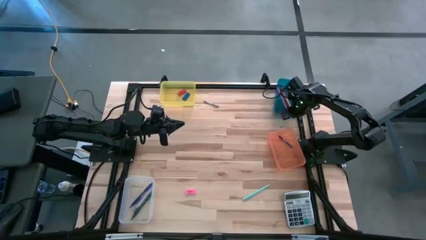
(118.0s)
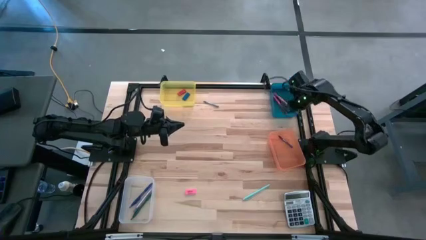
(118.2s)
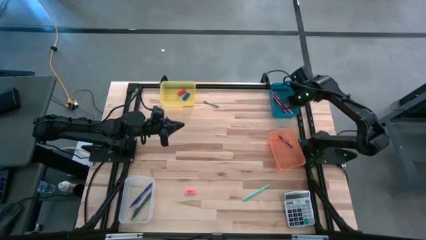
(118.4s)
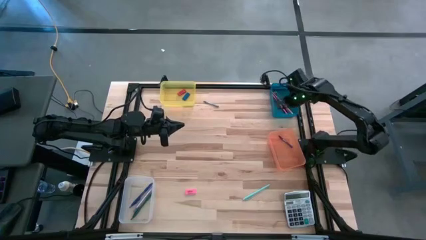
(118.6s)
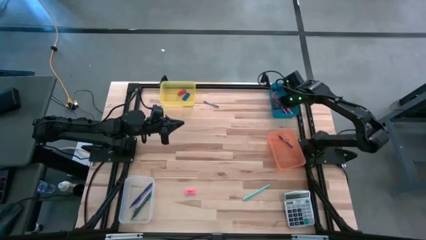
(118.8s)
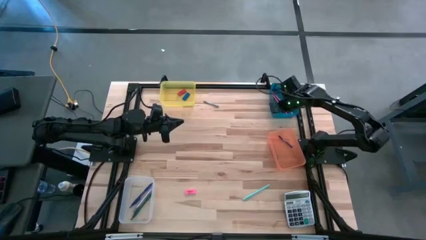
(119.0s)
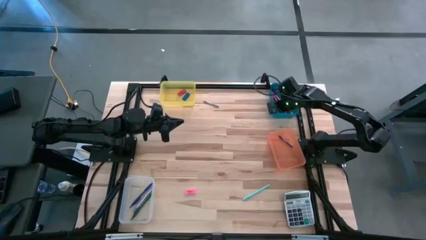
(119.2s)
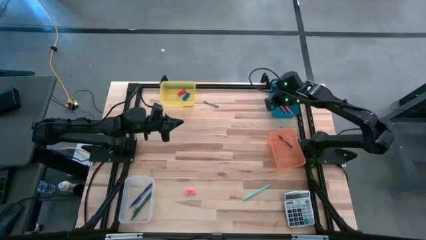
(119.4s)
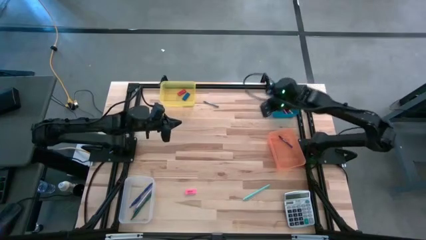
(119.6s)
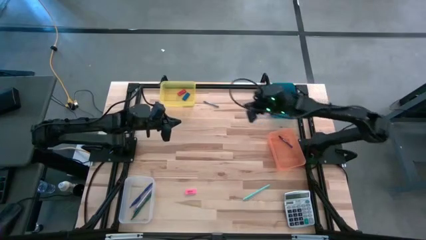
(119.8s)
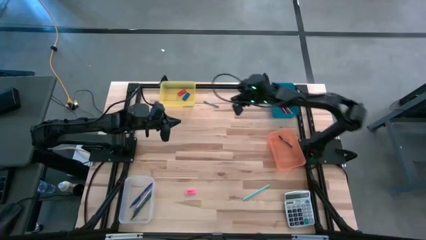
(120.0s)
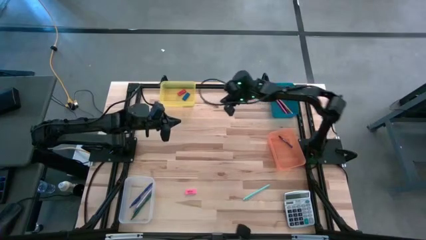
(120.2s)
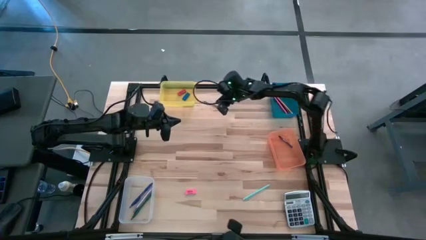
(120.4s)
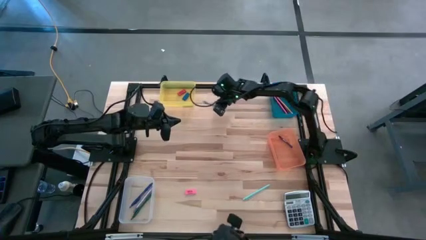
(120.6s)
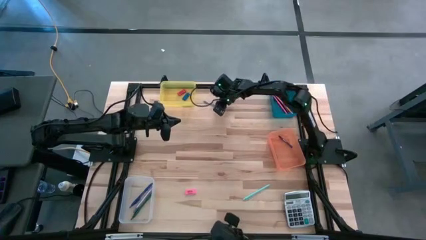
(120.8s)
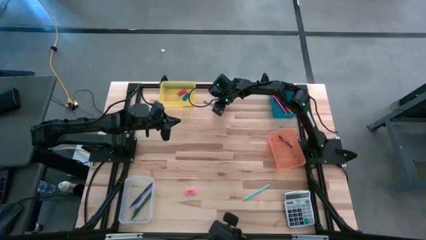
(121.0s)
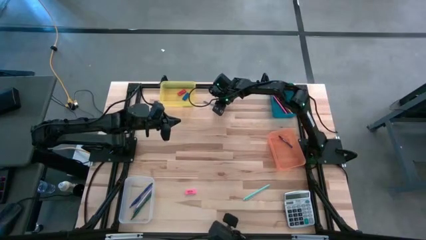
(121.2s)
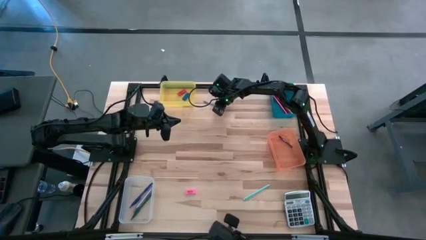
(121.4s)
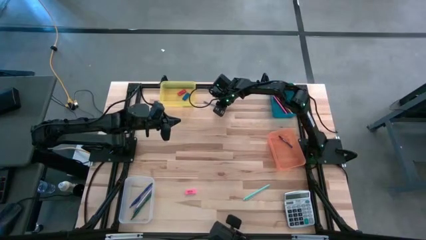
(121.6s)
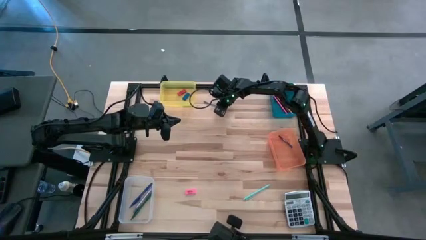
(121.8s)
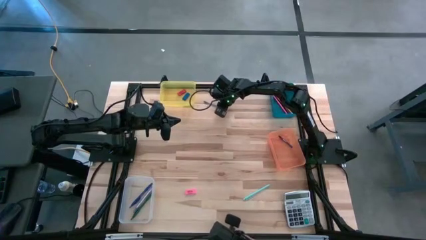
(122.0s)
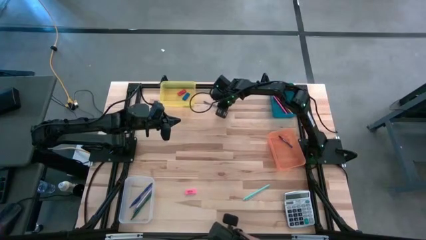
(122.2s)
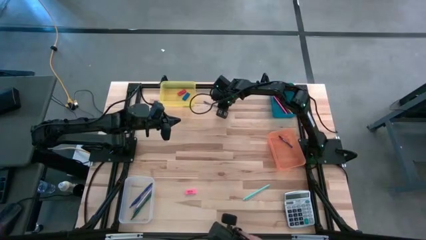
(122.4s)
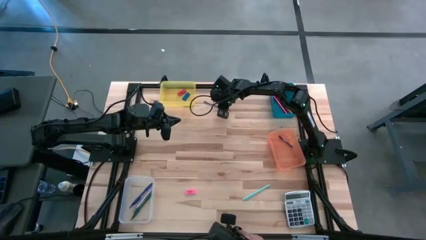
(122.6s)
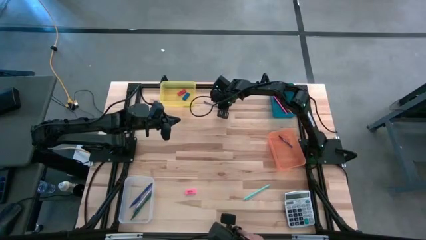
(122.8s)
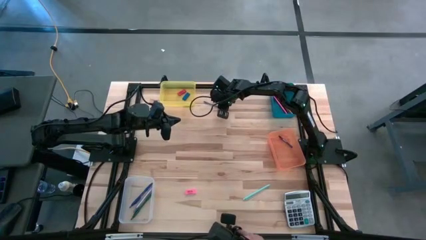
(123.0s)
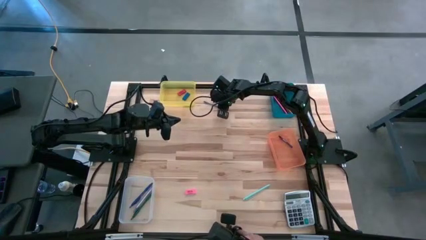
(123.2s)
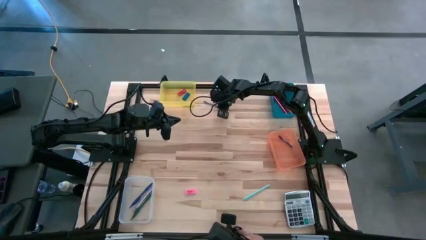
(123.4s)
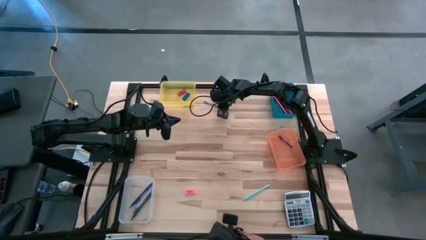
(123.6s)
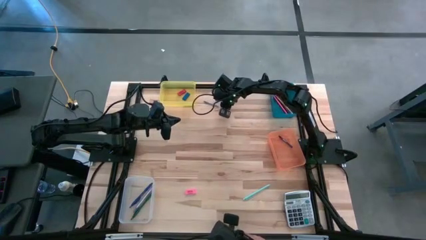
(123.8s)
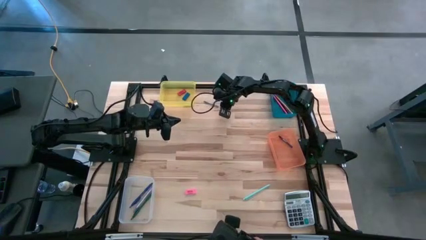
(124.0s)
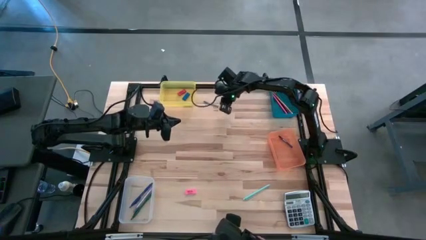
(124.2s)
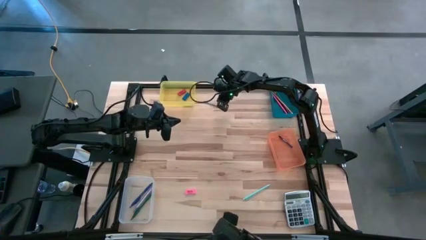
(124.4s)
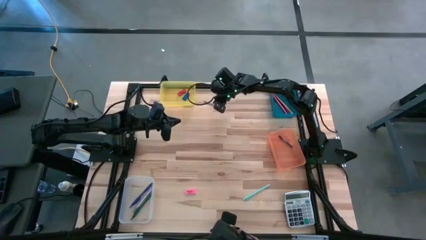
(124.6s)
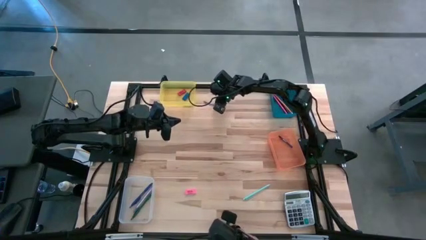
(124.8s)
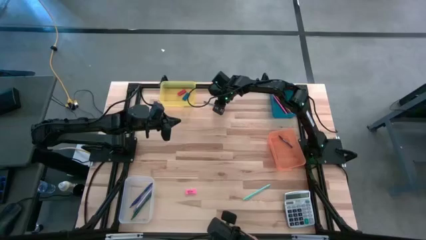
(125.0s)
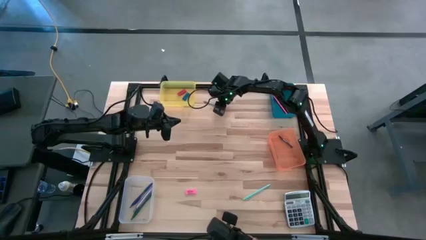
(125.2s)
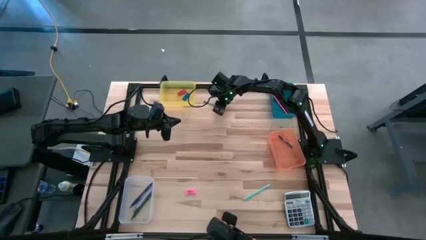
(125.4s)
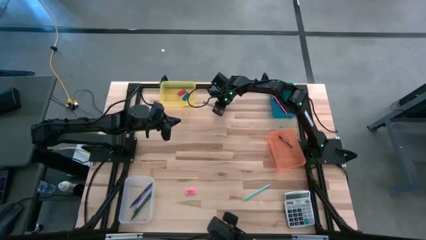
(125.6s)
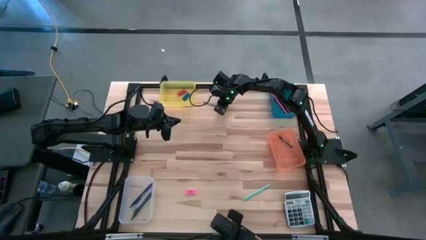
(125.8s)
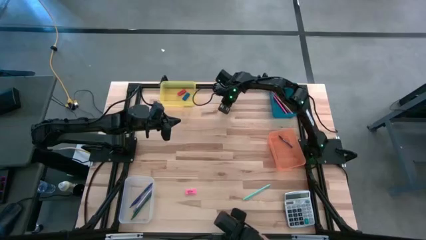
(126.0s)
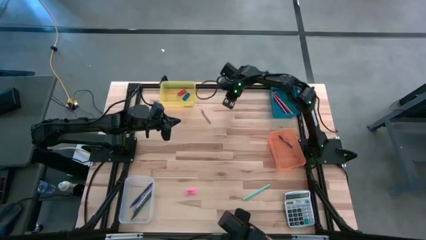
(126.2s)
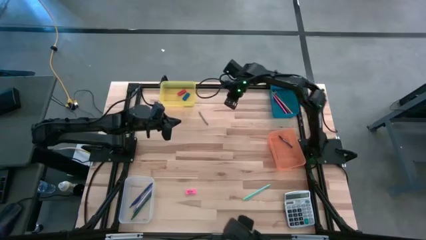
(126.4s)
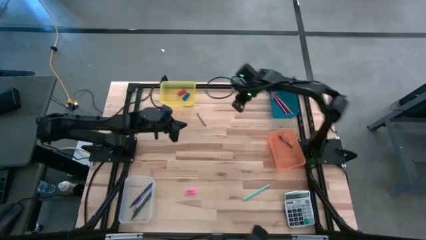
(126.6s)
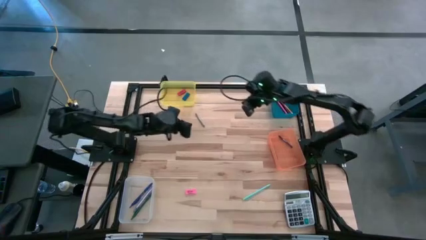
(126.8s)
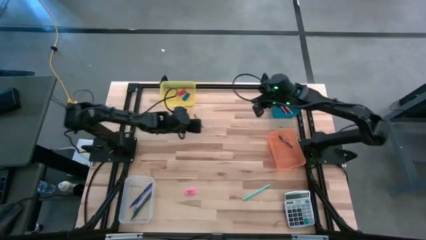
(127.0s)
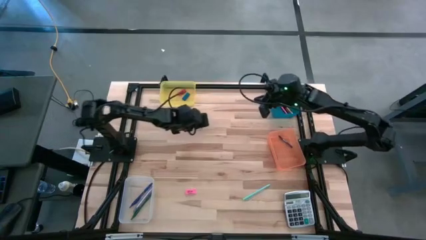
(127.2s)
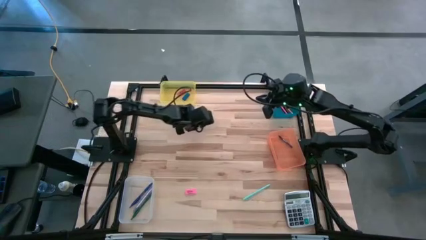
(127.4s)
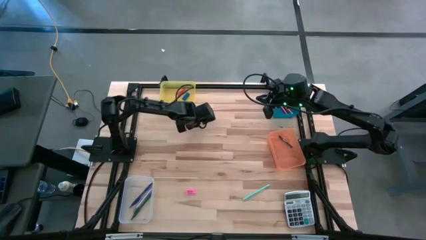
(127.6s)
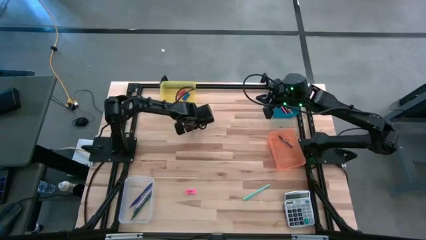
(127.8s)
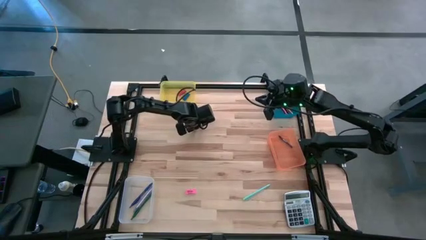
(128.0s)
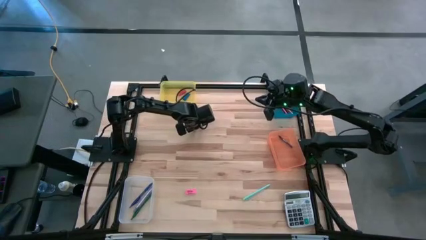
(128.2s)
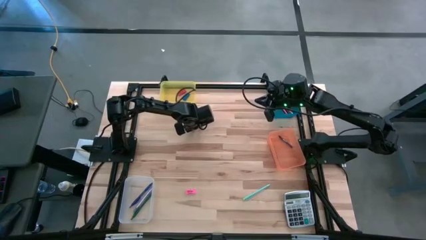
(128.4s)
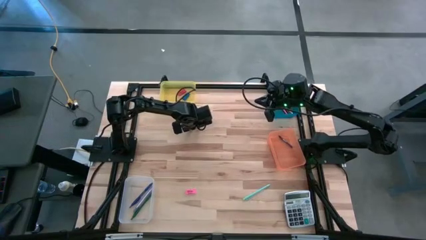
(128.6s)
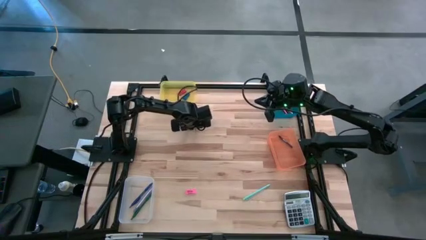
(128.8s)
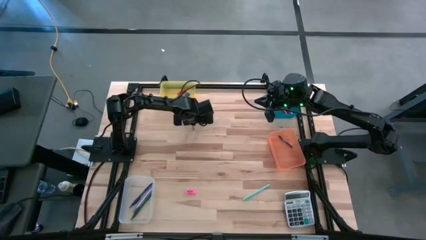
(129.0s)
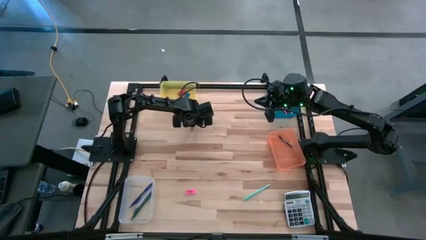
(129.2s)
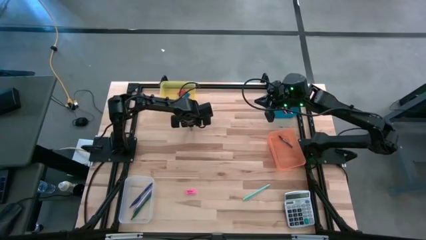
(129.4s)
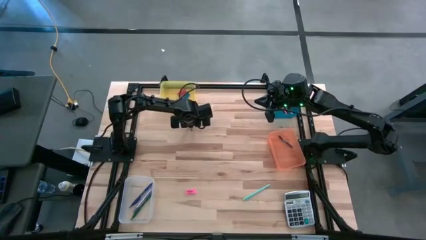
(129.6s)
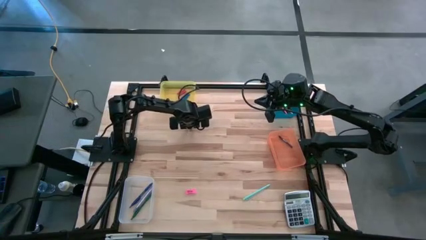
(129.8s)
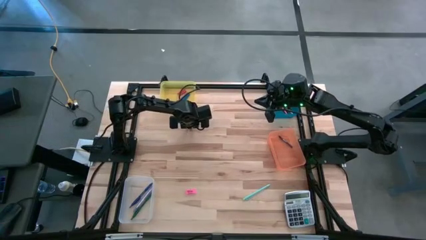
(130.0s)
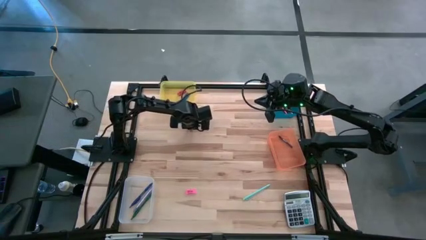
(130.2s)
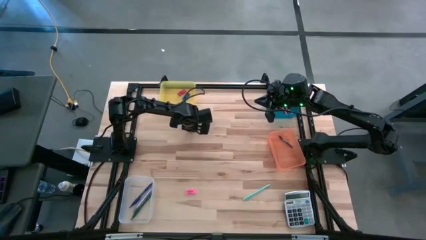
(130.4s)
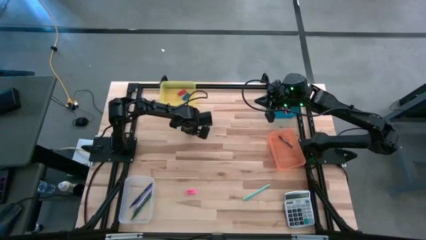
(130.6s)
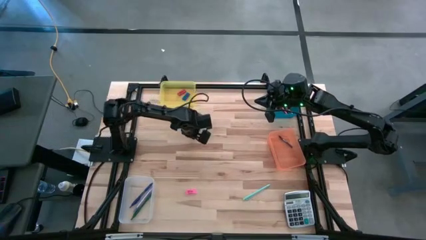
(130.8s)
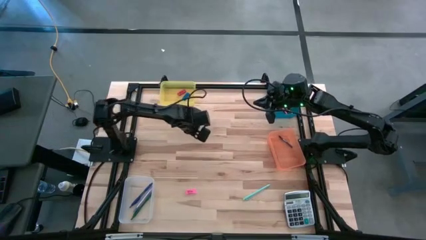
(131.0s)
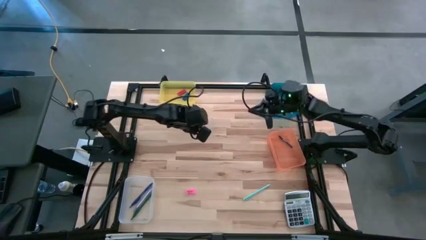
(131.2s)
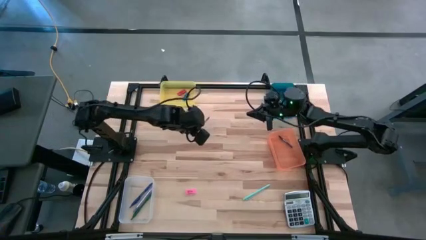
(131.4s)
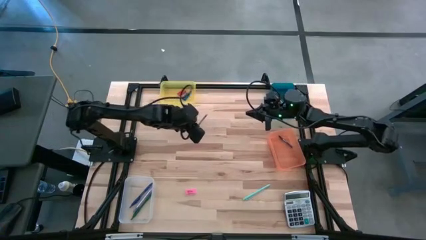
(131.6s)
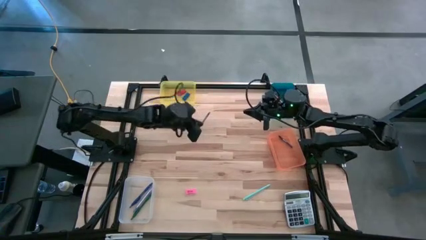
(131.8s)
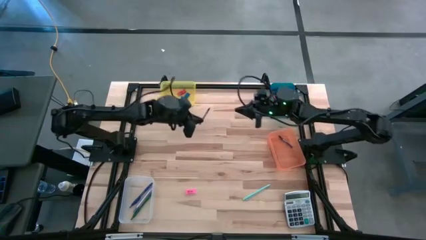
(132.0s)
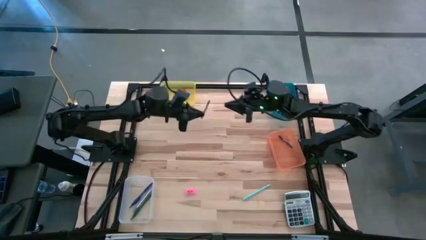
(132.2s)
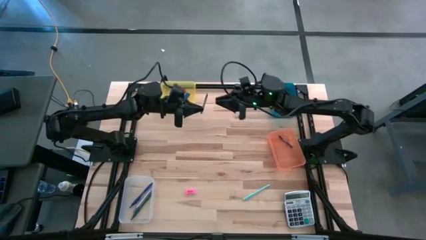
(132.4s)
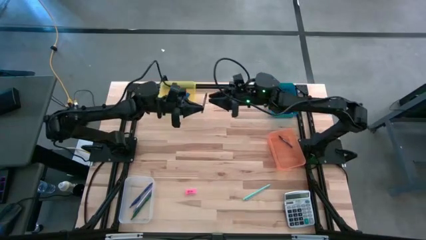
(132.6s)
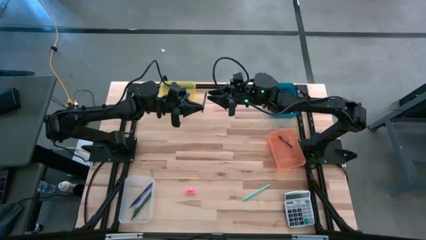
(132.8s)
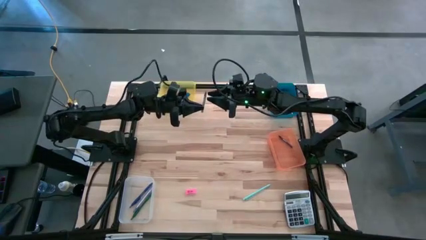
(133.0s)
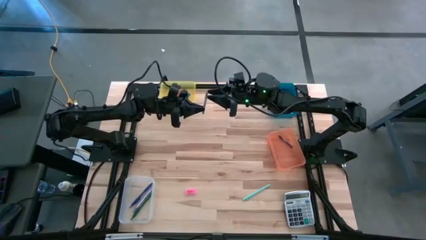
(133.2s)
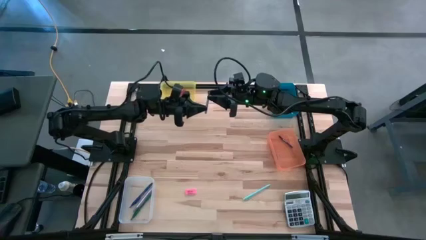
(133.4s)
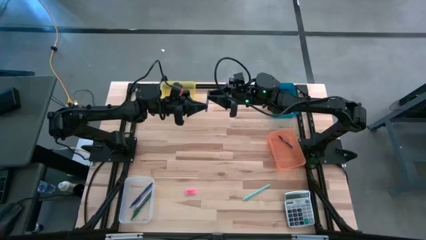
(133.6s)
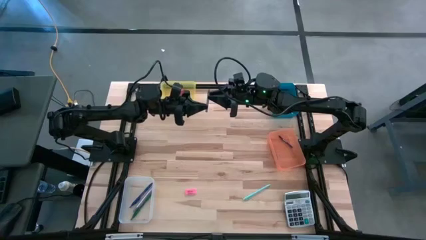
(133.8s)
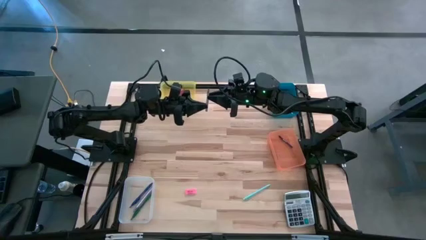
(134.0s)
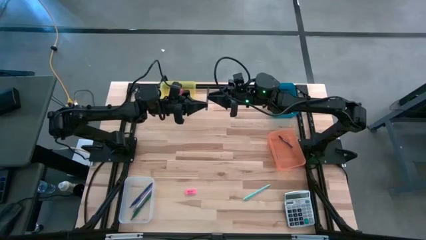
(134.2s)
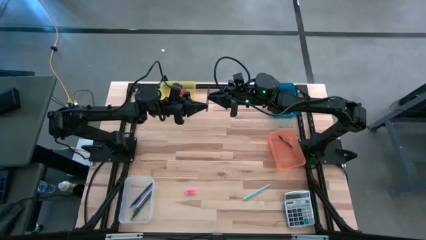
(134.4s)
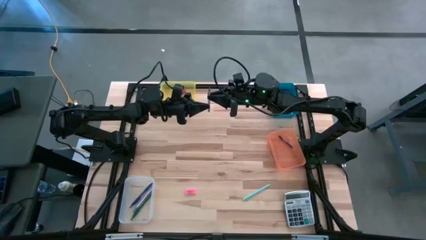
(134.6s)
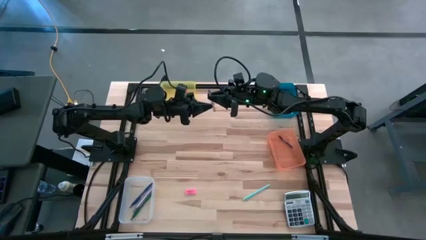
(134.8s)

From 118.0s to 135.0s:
Task: Sort crayons/erasers/pens/pencils in bins
Put the gray crayon into the orange bin

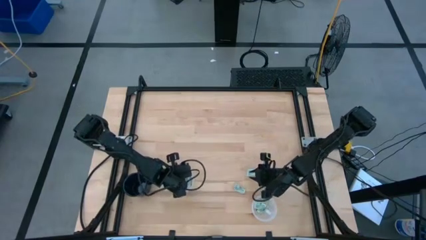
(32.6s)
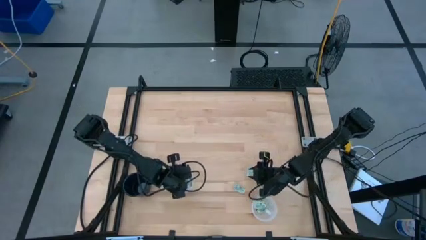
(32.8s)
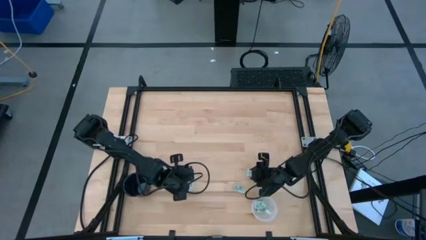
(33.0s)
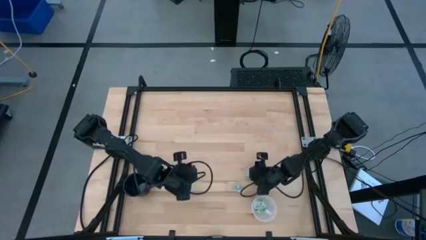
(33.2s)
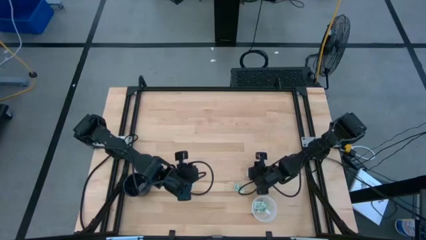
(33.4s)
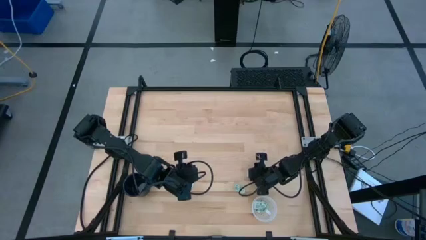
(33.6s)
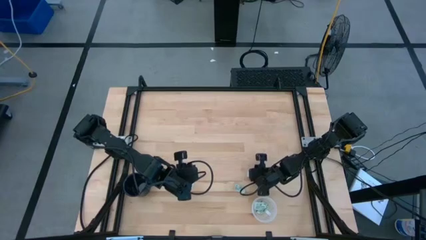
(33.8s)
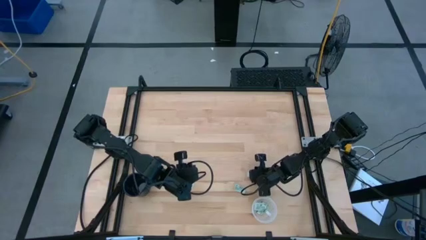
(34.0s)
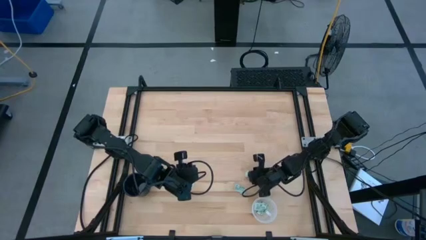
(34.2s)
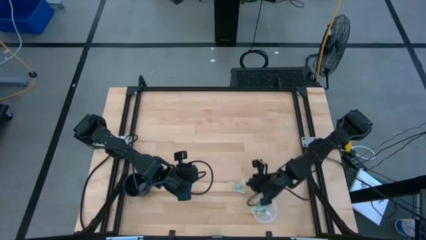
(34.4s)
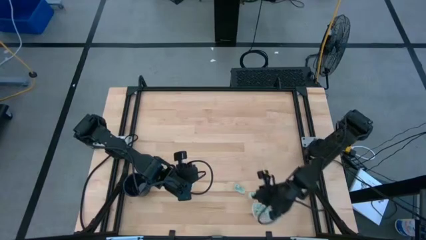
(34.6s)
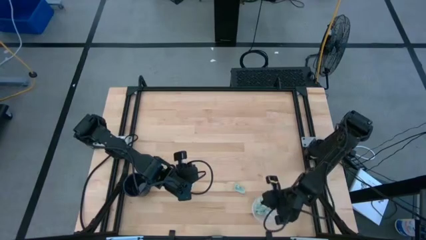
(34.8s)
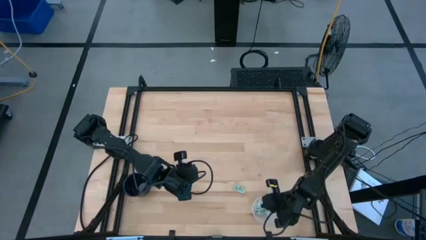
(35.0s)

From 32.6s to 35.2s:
Task: Pick and place items into bin
Put the stevia packet into the bottom transparent bin
